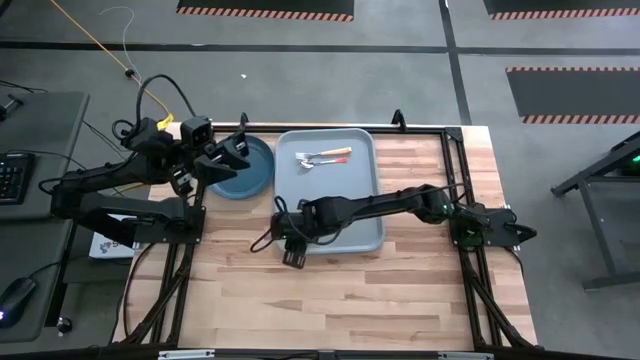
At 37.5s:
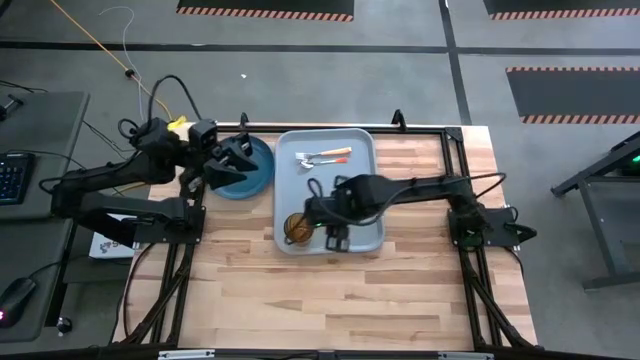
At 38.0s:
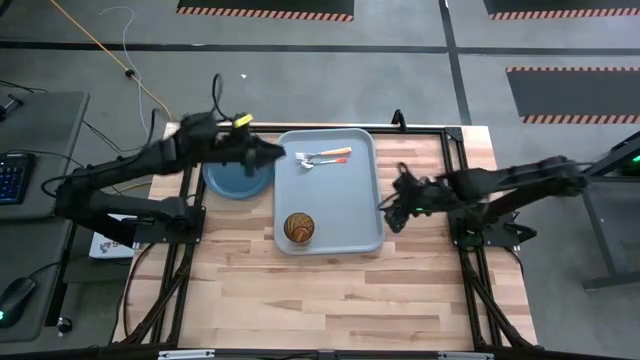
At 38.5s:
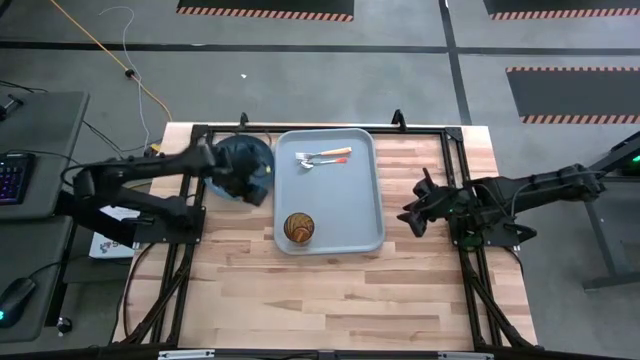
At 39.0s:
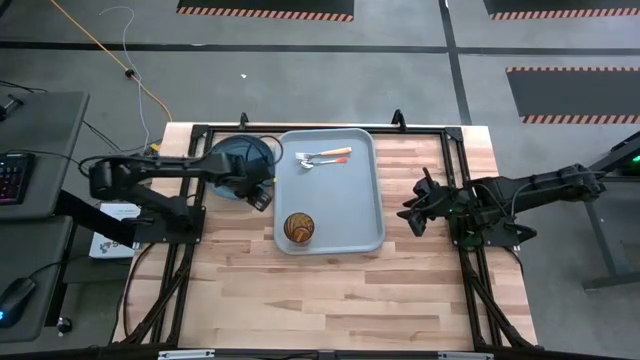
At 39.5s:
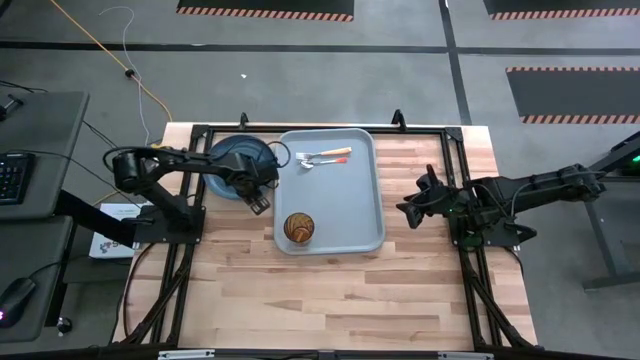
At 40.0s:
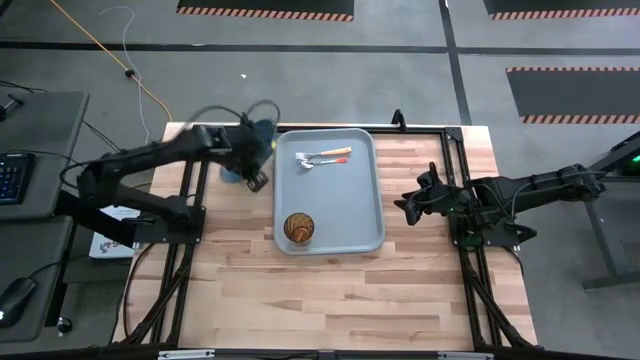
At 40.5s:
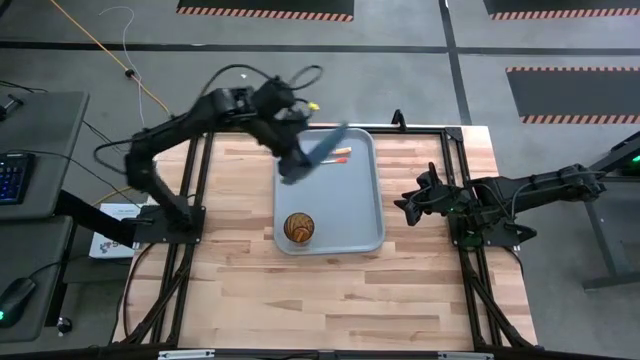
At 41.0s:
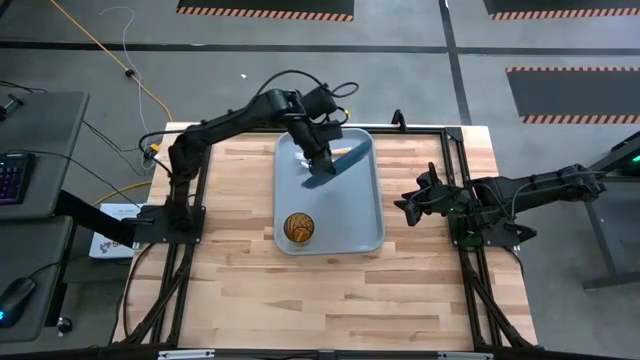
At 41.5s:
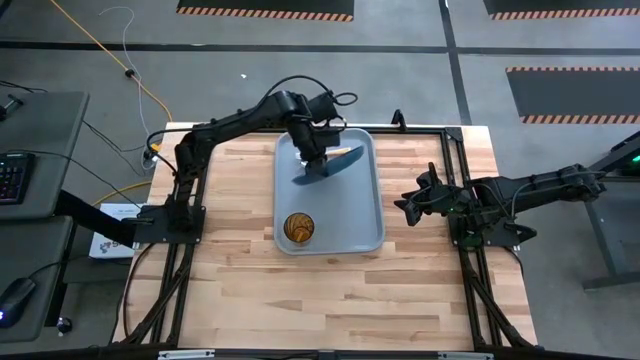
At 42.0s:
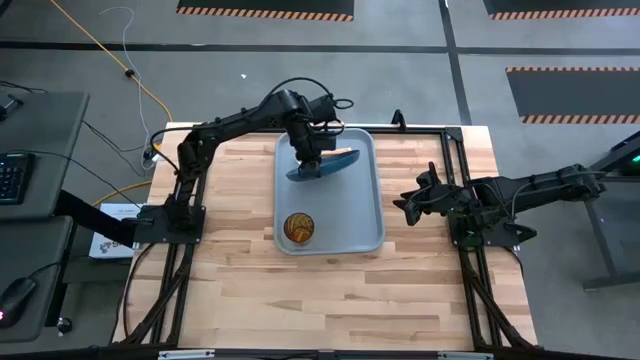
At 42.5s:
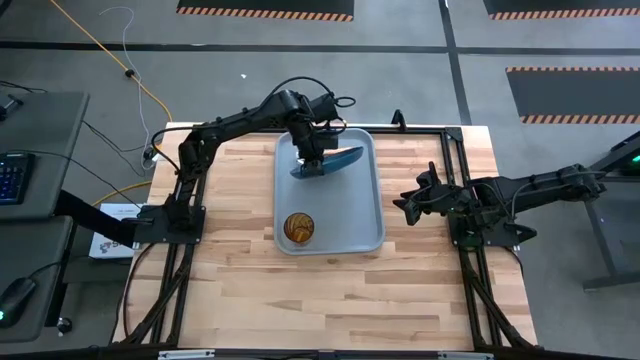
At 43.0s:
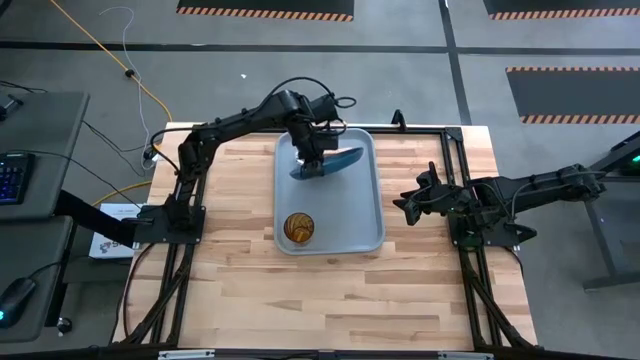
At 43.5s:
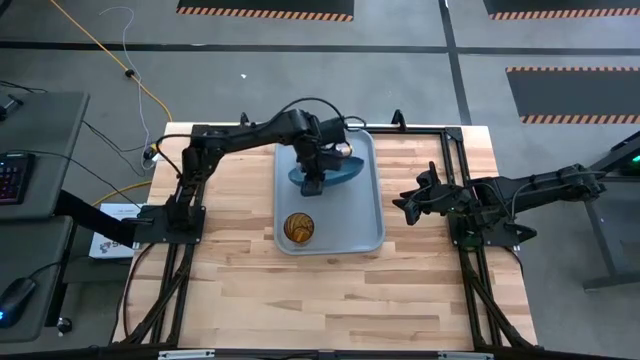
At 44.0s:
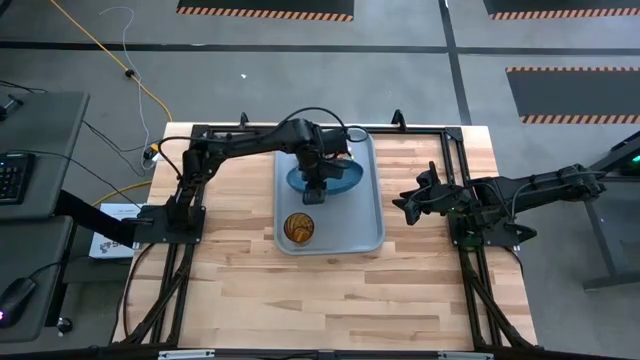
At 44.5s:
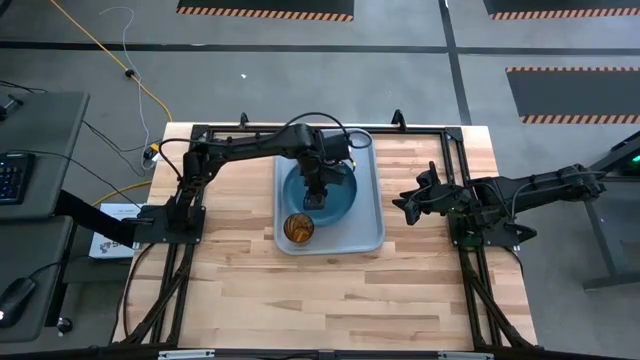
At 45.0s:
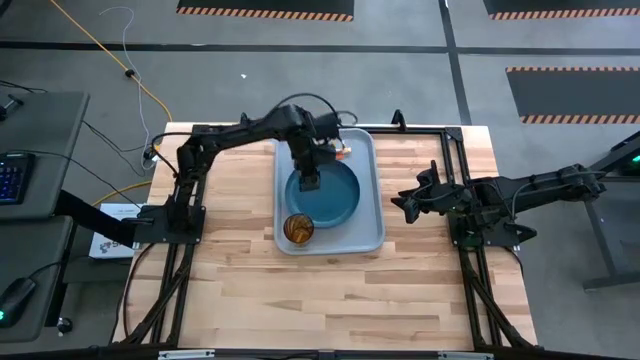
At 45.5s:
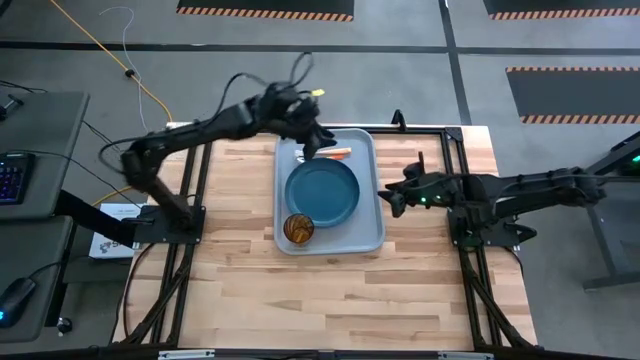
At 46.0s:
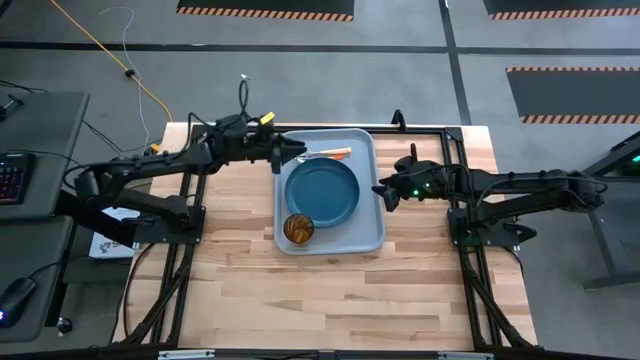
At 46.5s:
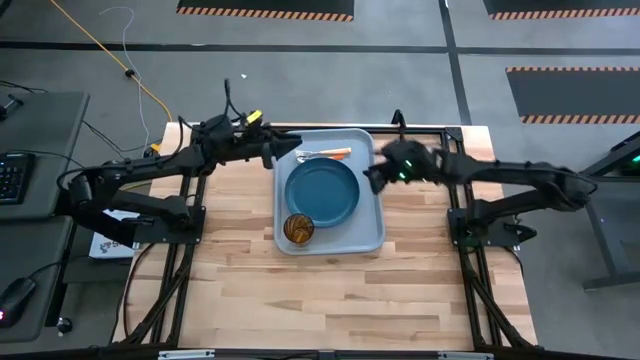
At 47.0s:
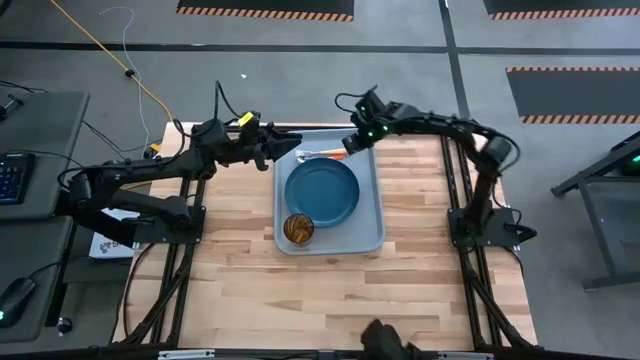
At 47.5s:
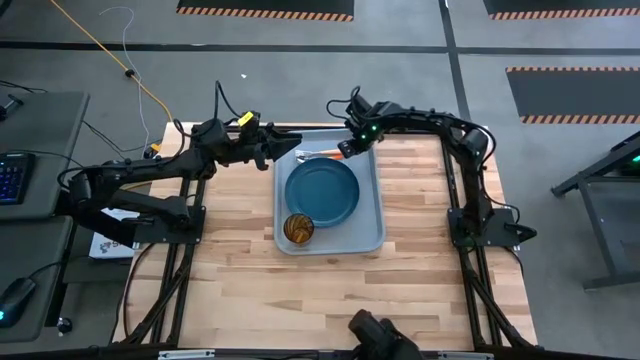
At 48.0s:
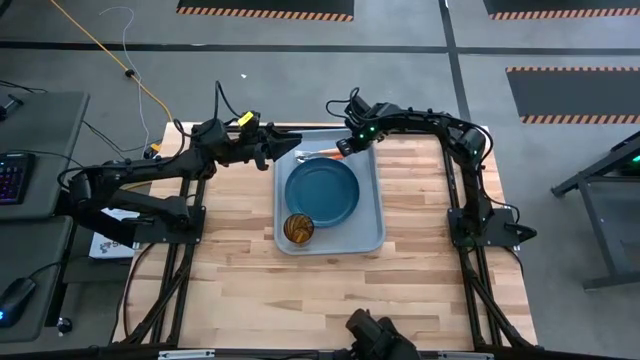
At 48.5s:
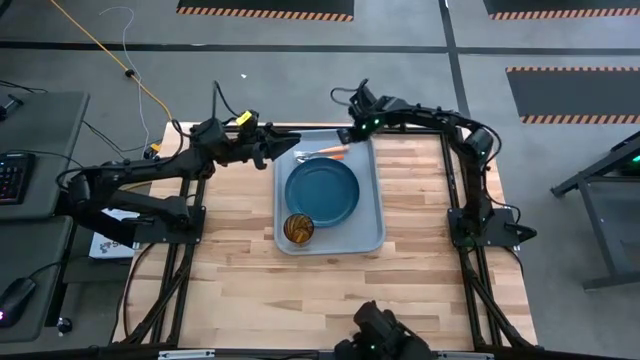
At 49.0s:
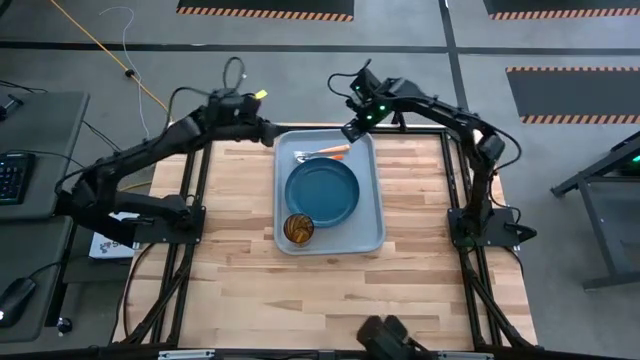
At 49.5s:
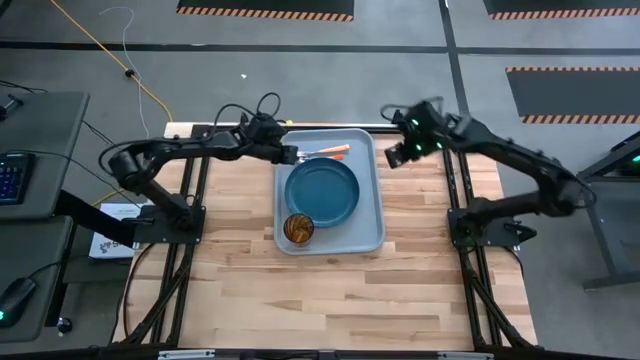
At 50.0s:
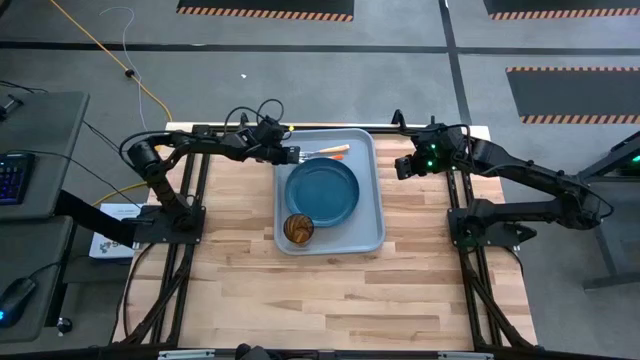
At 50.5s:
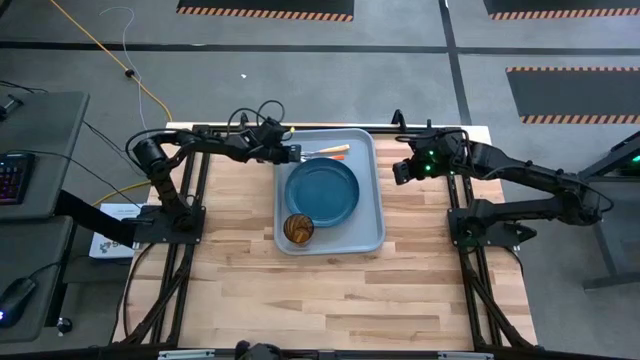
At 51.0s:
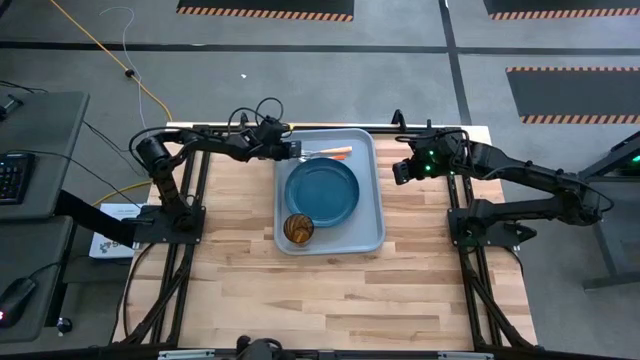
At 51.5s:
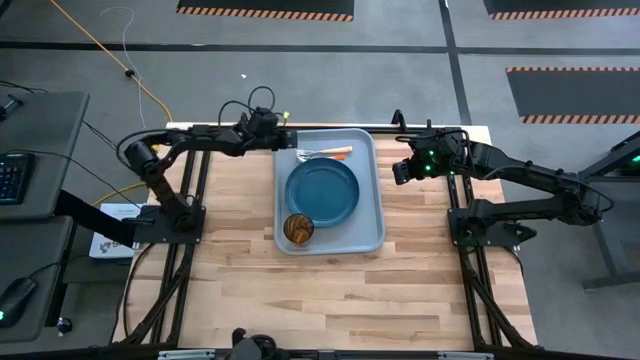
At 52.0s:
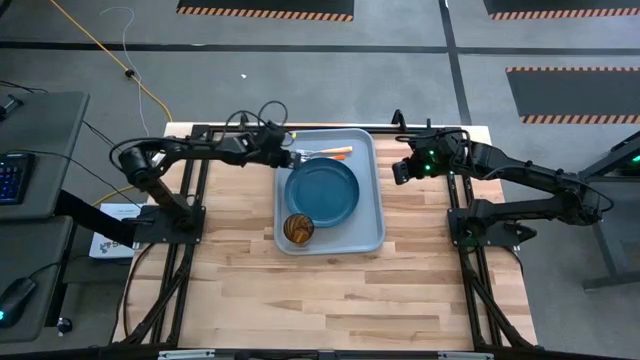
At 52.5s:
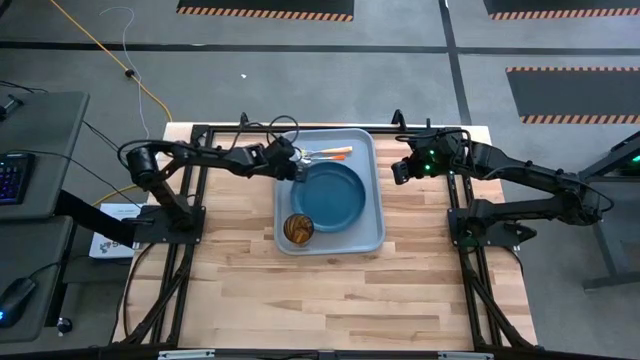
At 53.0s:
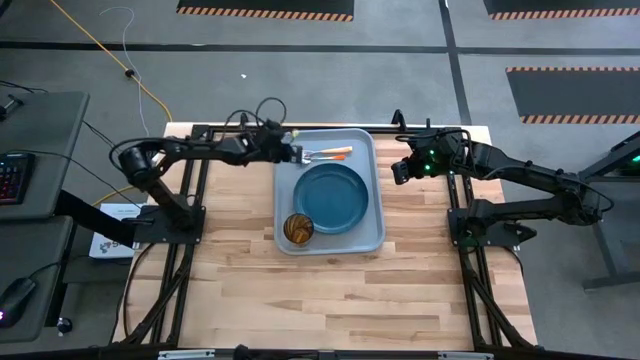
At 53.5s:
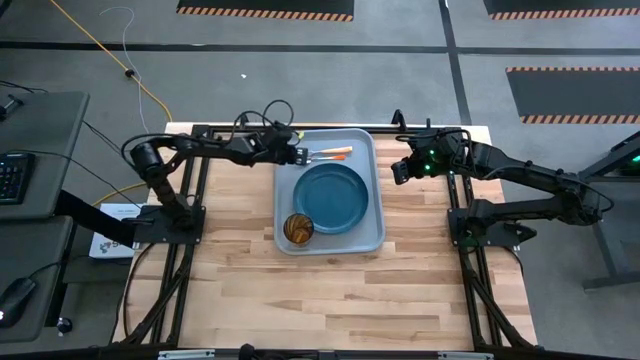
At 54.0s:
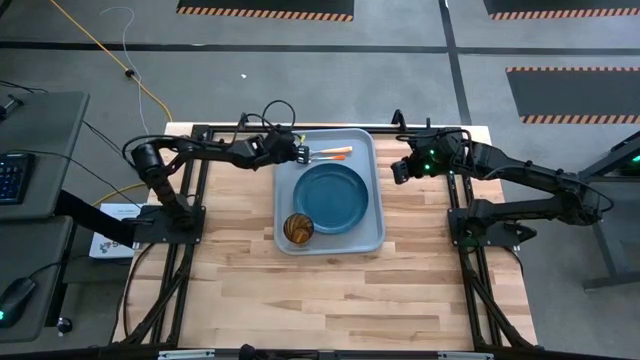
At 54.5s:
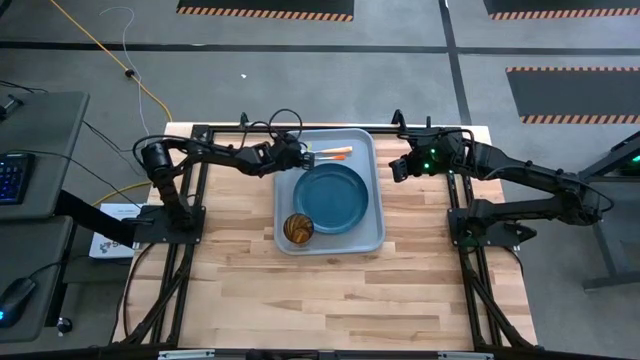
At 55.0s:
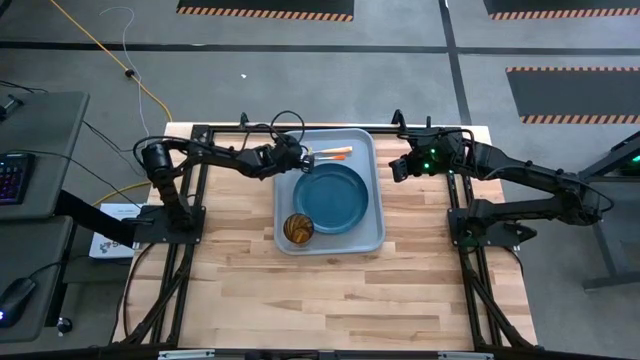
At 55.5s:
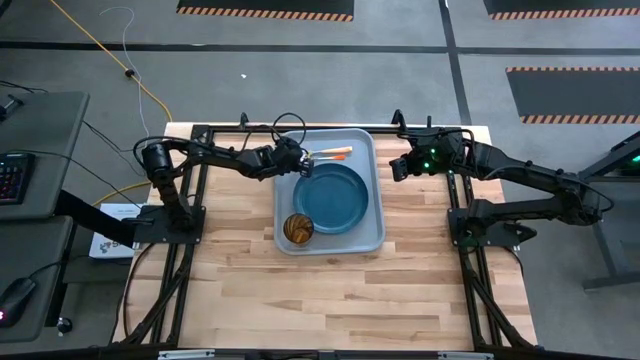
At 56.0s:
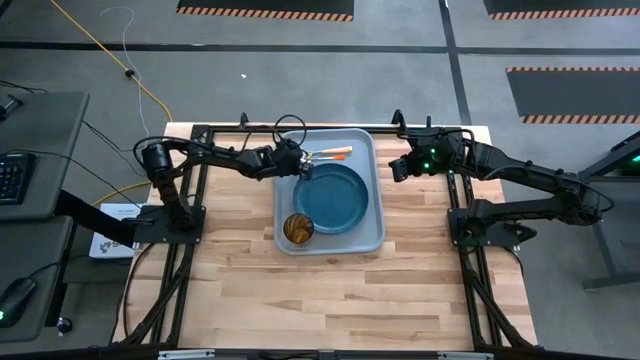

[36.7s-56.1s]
Task: Pick and place plate/cup/fork/spoon on tray
Put the blue plate on the gray tray

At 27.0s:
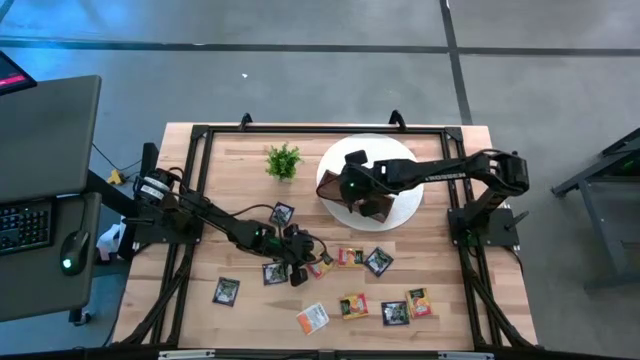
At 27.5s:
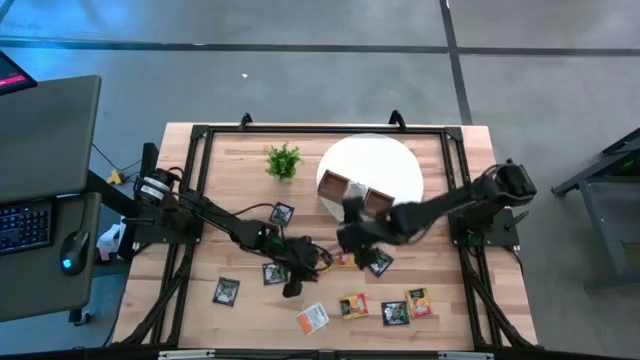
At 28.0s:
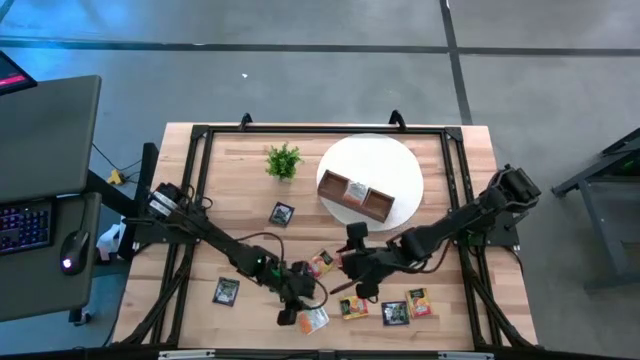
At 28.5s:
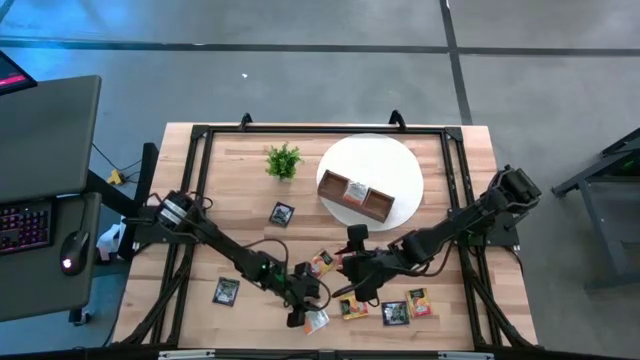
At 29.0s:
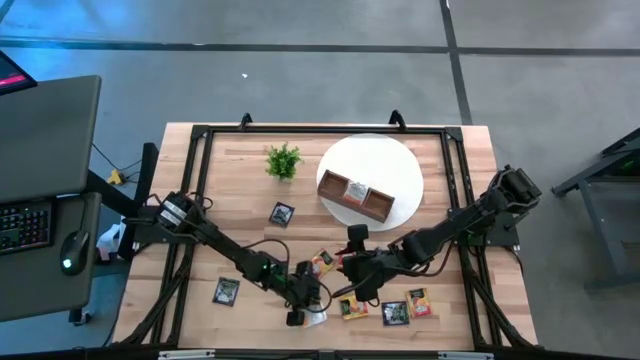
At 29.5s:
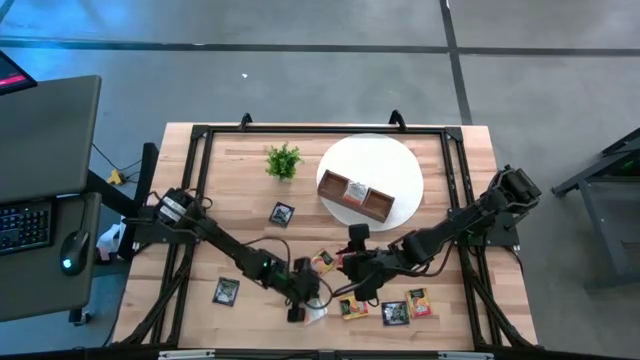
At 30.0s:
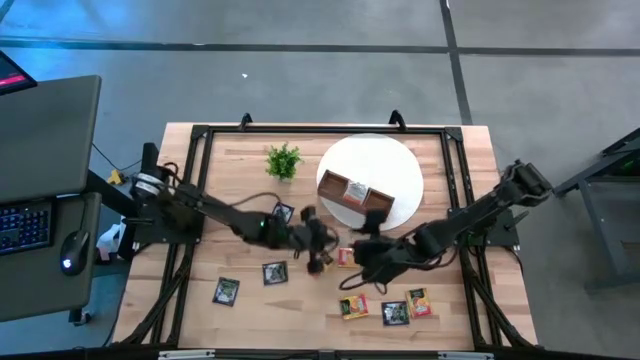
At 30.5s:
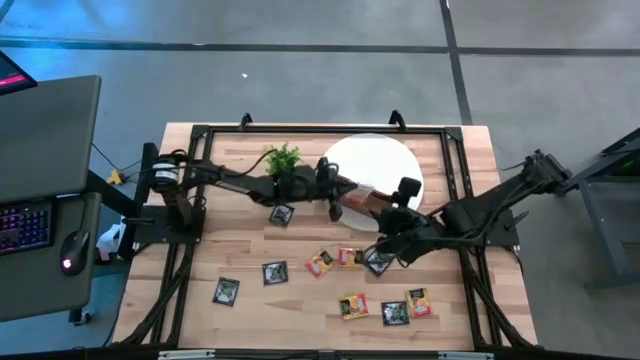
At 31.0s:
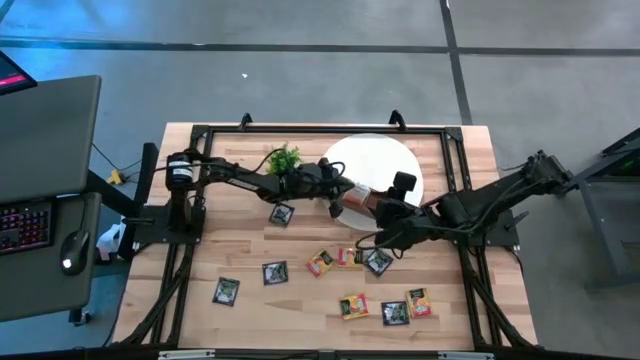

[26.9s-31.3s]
Task: Pick & Place Tea
Put the white tea bag into the middle compartment of the wooden organizer
